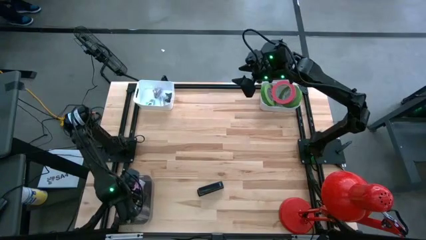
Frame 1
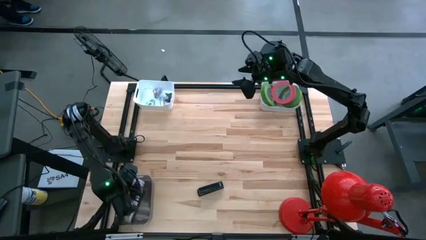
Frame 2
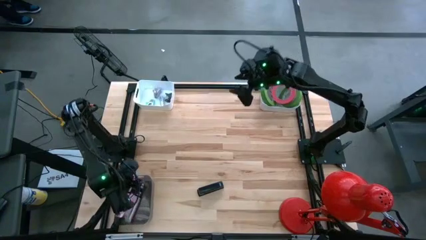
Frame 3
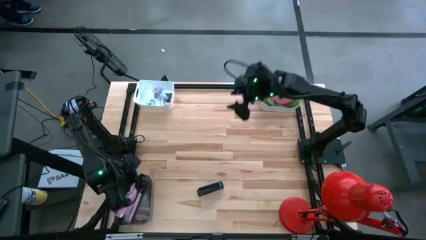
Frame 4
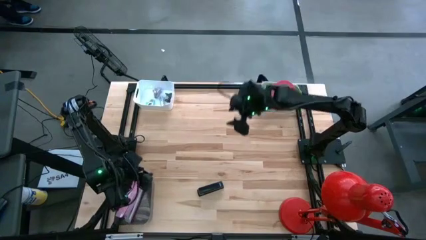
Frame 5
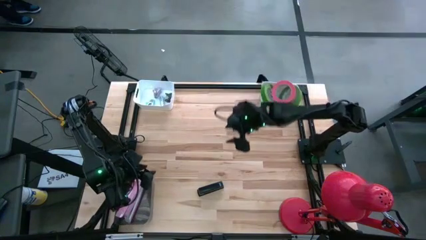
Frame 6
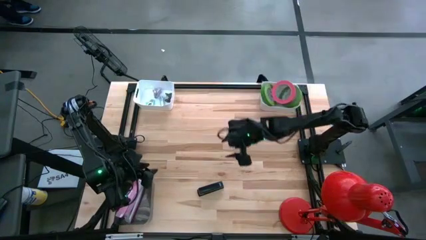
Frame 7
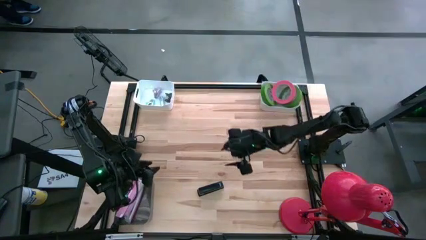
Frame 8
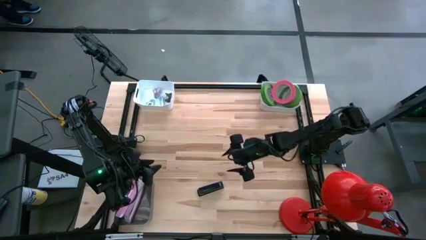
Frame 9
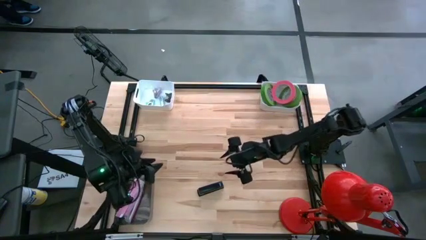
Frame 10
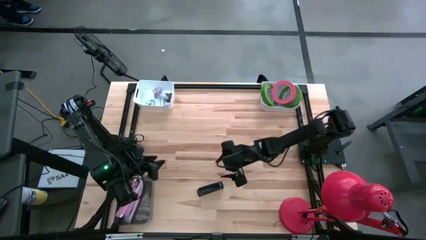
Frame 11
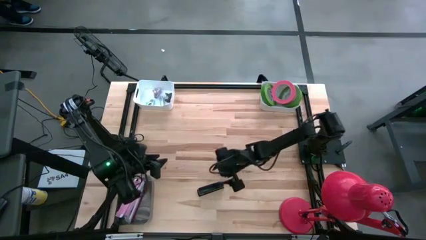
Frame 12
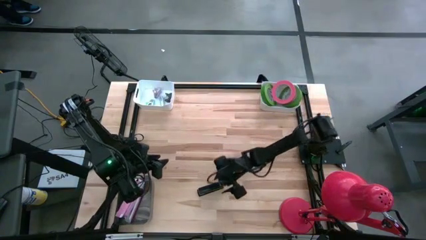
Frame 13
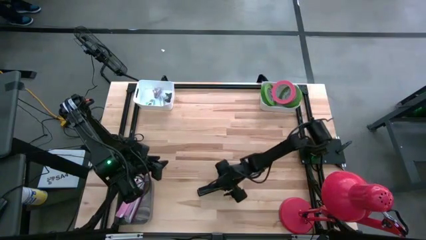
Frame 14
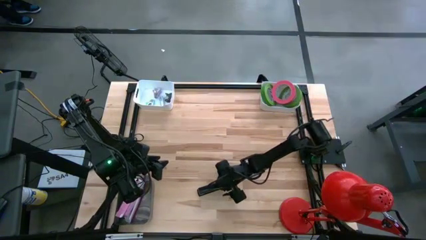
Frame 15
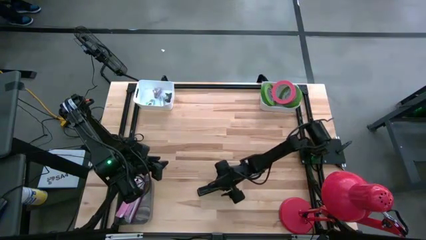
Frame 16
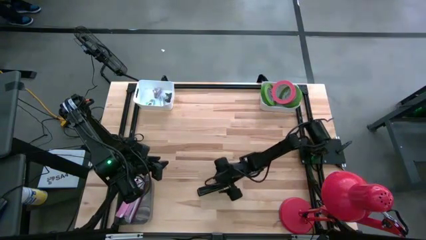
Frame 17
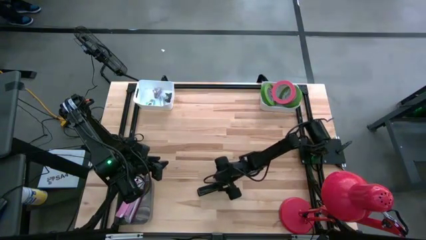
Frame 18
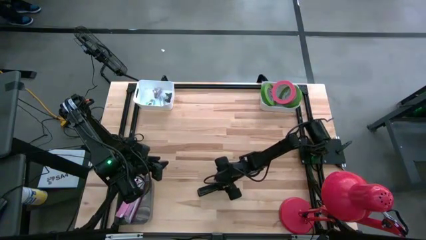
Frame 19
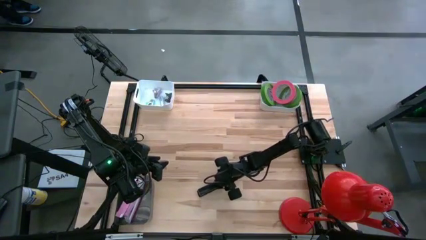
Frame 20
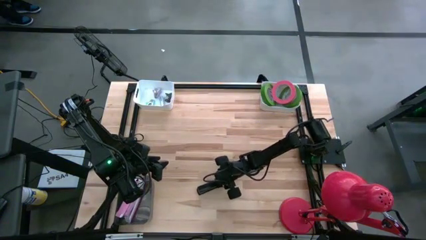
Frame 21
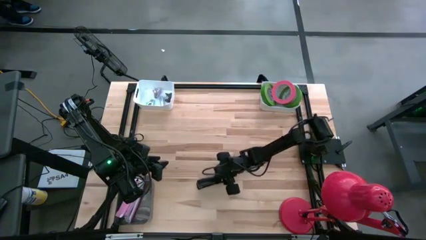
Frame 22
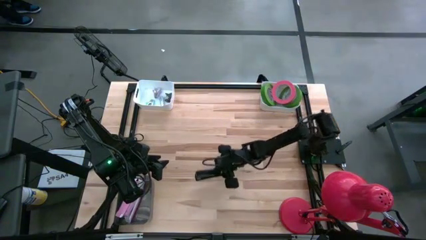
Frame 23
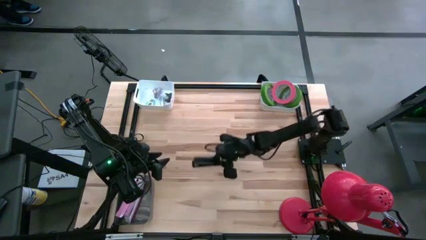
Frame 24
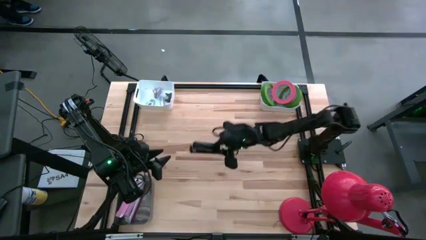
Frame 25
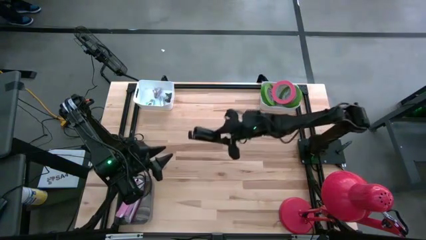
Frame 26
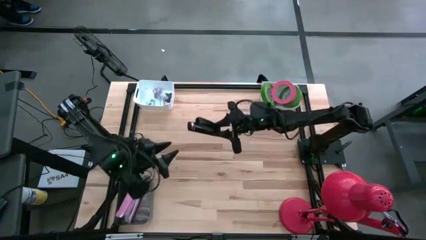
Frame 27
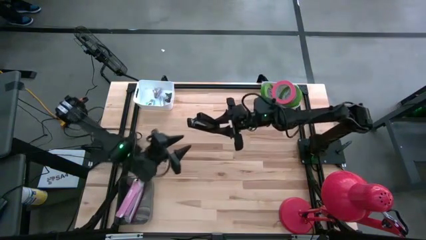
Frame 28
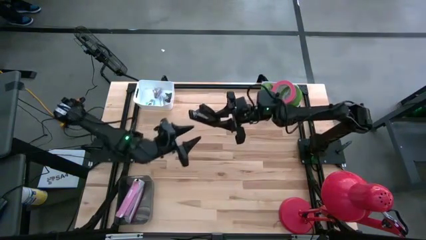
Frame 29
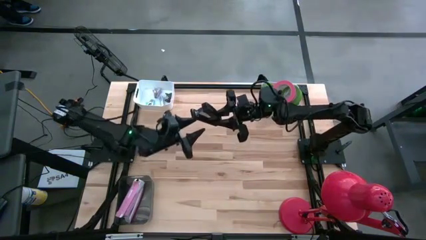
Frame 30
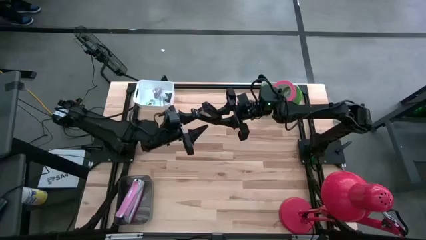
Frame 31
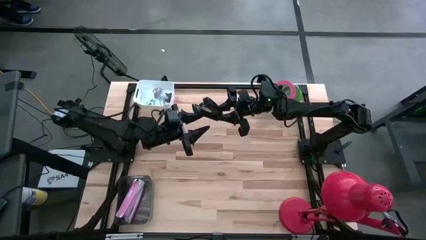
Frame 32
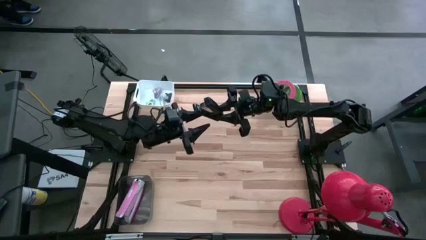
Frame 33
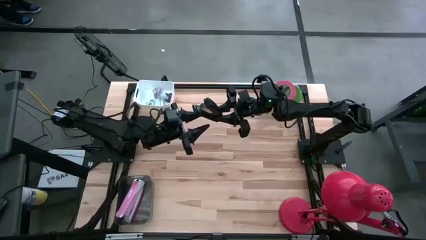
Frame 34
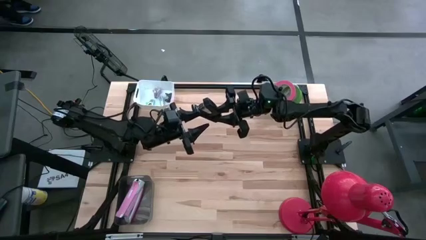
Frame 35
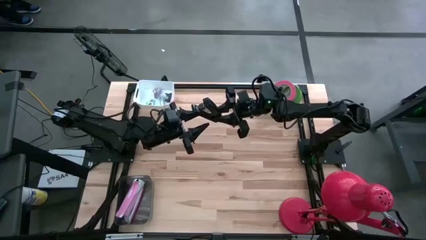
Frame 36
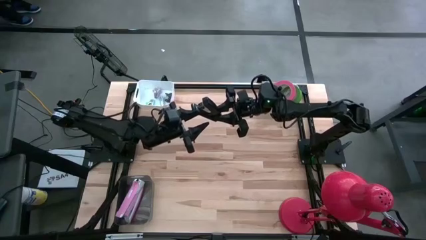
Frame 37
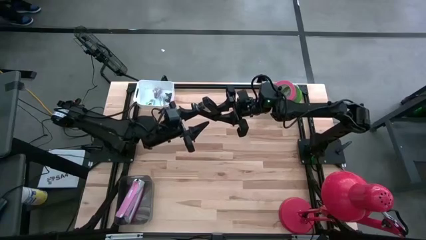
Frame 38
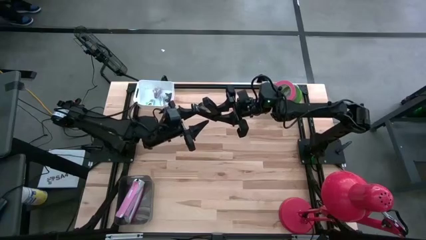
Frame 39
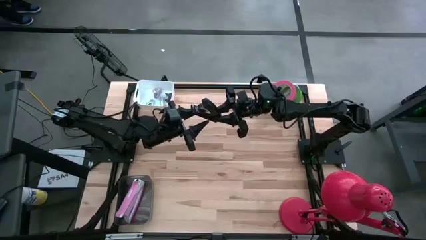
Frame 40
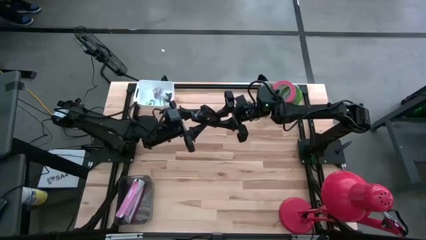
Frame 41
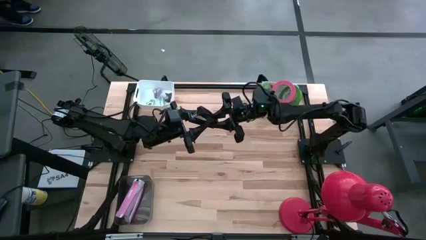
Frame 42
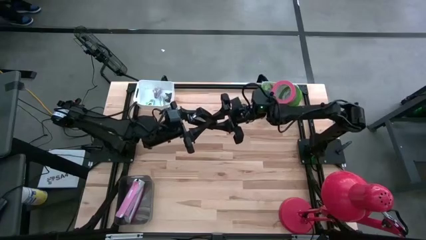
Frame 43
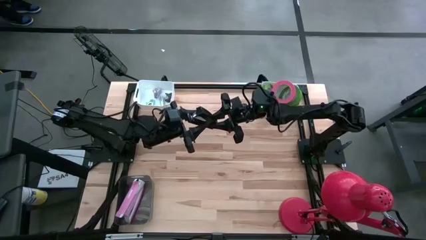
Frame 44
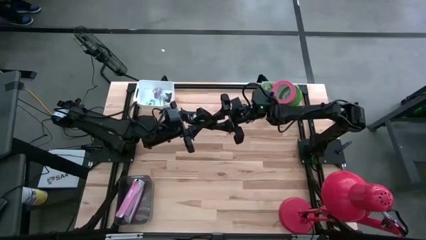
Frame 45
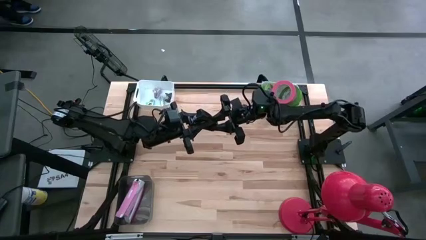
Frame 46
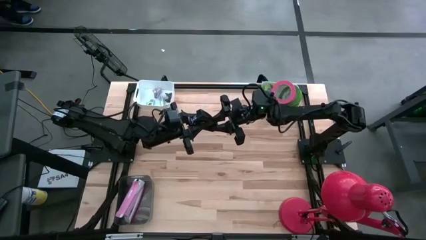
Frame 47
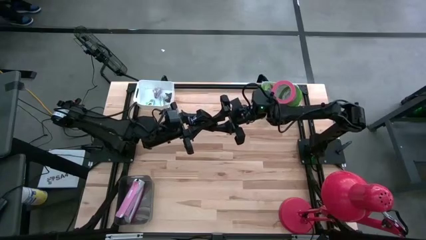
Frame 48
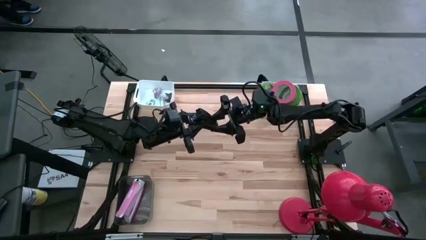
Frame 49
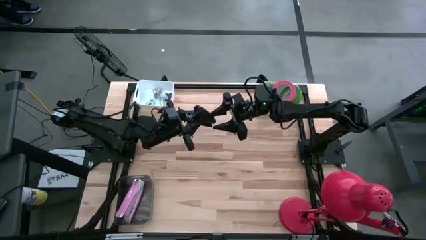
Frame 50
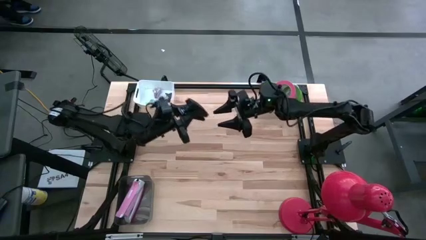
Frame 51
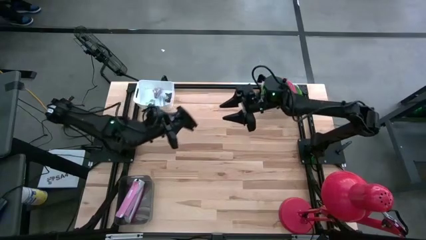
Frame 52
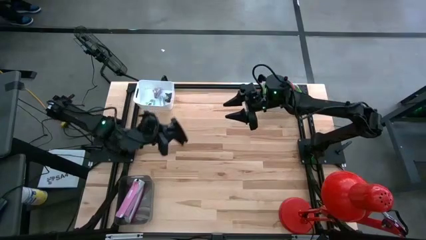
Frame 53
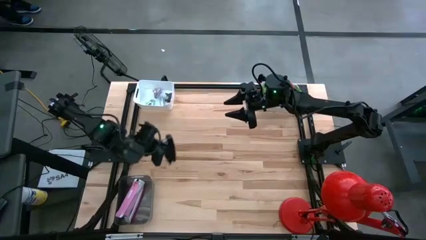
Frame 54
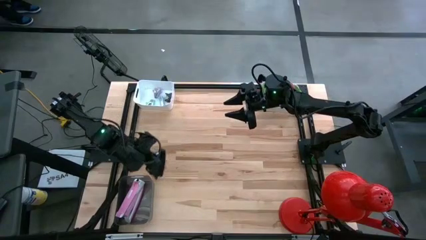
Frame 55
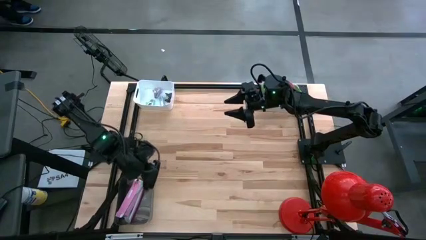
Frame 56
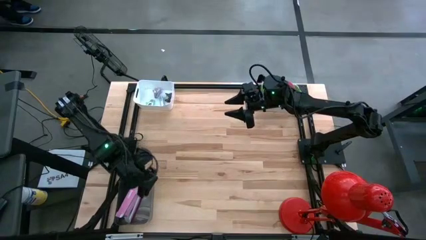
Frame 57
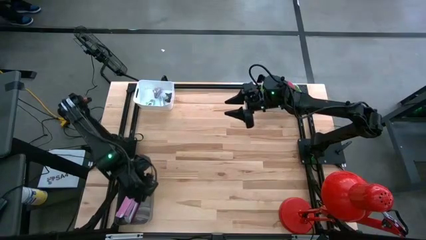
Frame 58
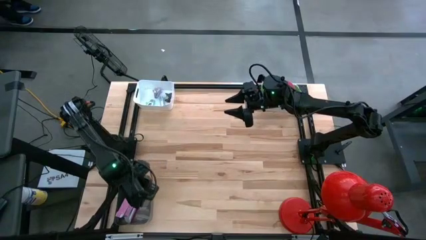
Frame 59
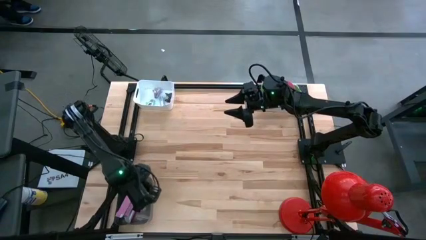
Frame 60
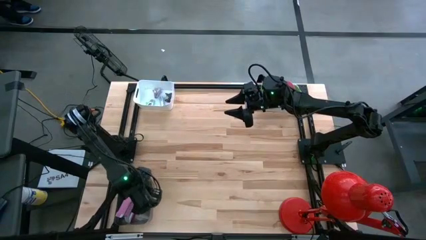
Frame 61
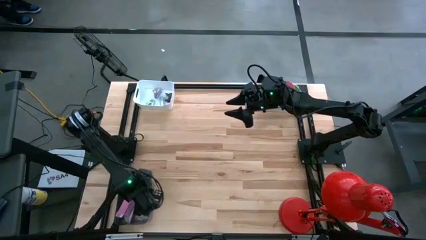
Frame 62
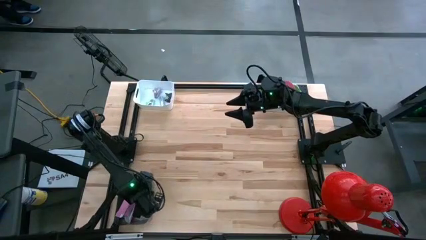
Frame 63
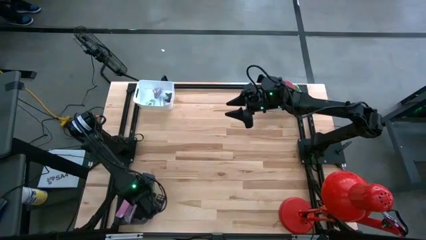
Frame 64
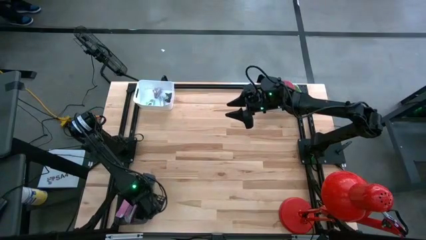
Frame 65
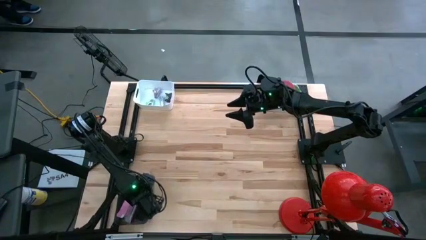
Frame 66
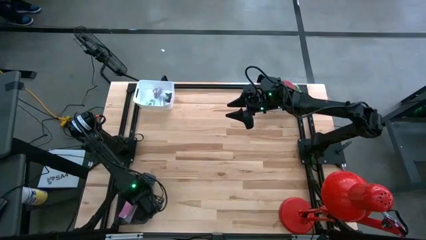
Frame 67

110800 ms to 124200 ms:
Task: Pick and place Stapler, Stapler remover, tape
Put the black stapler into the black bin

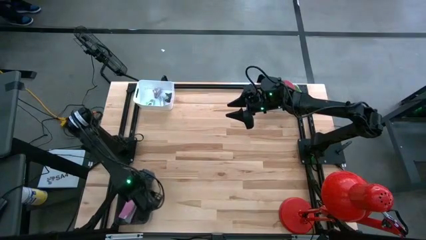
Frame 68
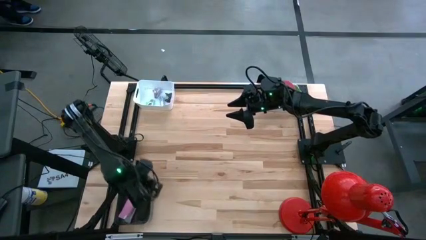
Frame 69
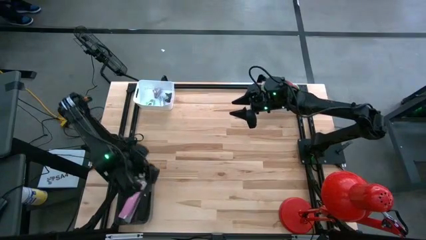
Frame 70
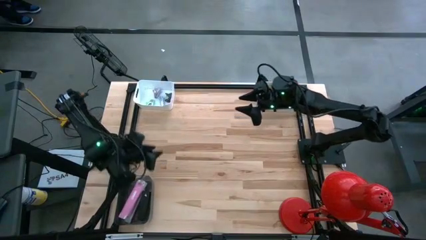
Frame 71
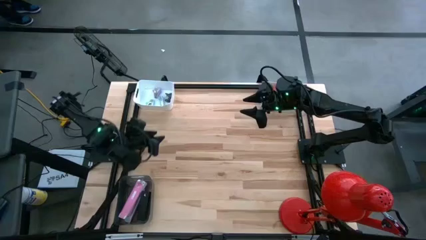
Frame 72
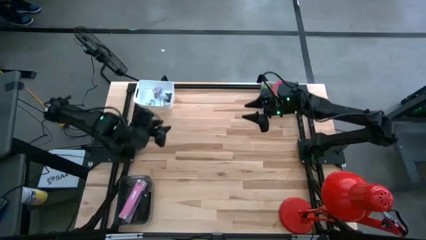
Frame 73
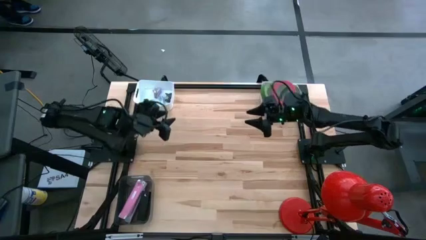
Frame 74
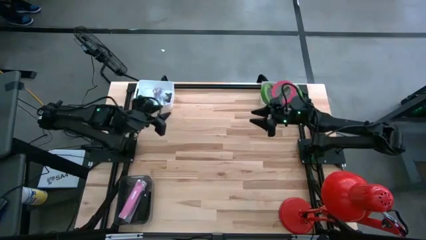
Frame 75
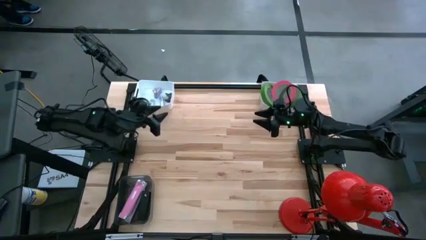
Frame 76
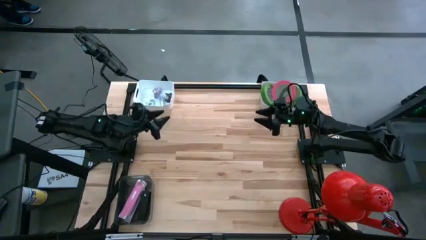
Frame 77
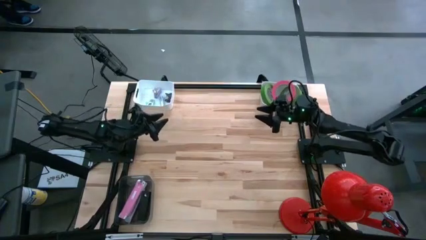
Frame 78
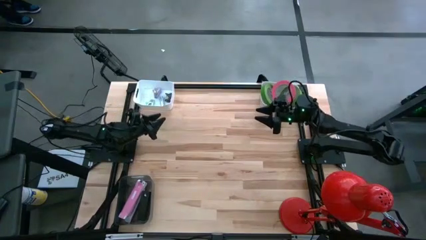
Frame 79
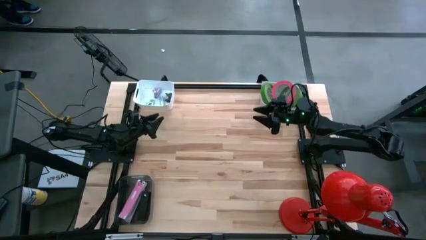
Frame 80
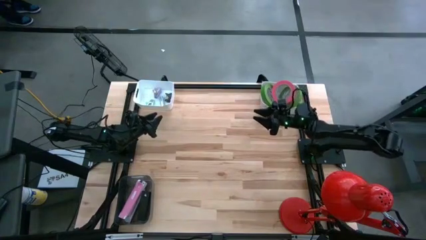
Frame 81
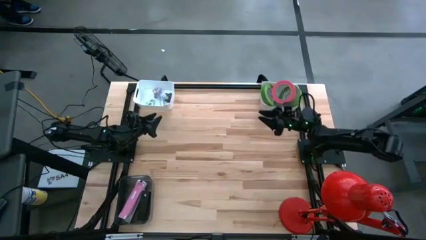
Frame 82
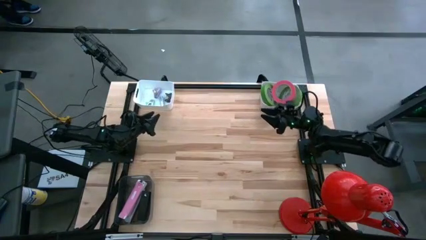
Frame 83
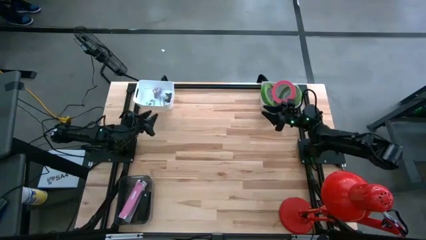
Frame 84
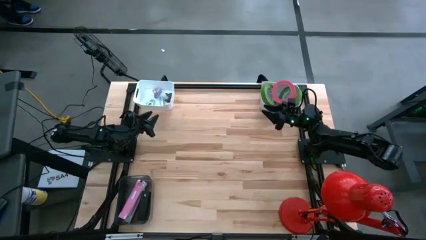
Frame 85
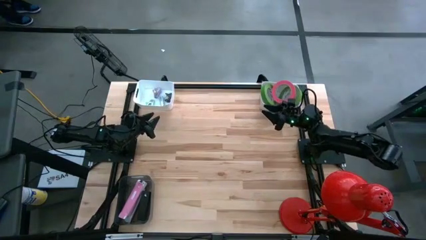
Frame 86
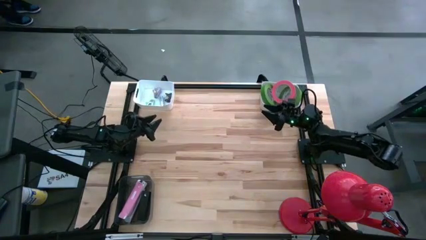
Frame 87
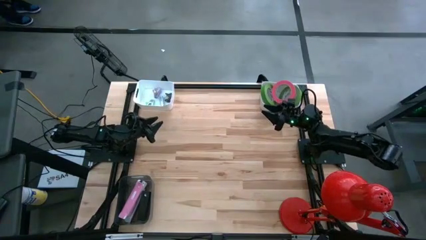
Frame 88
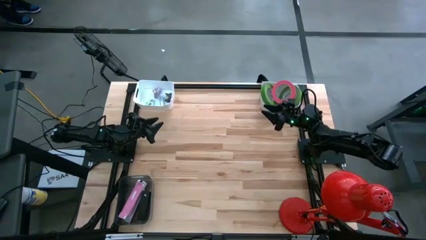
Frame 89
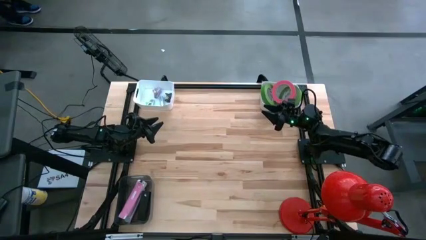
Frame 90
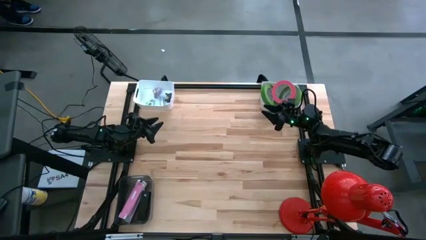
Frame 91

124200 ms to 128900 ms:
Return to Home Position
